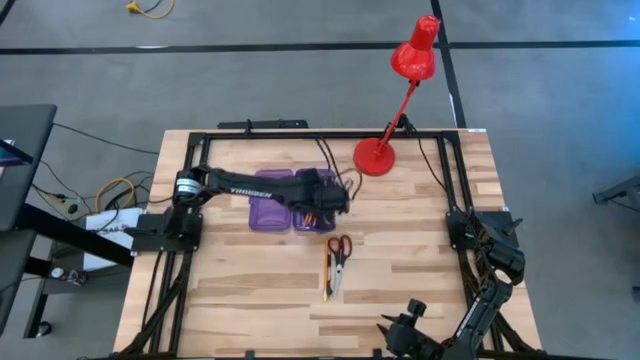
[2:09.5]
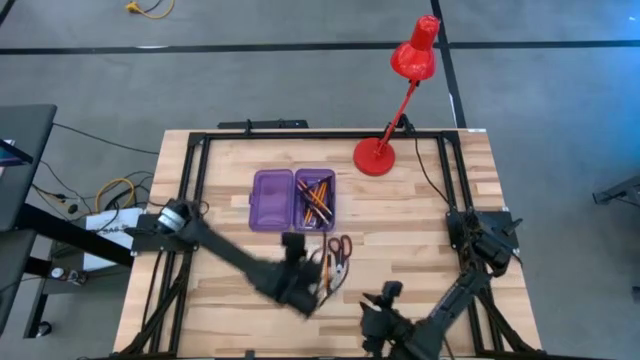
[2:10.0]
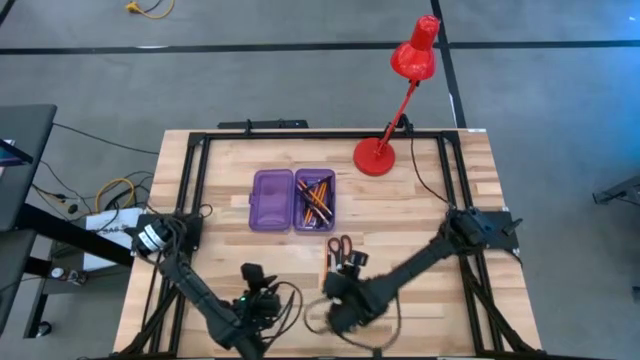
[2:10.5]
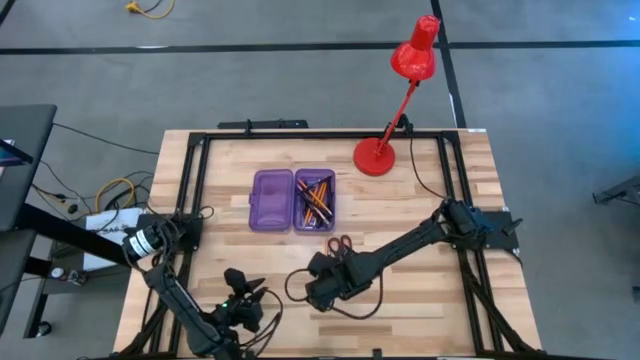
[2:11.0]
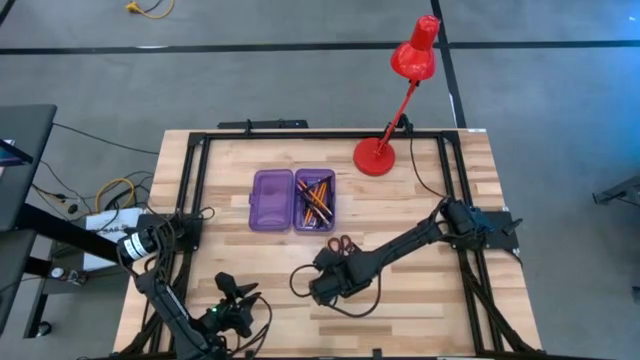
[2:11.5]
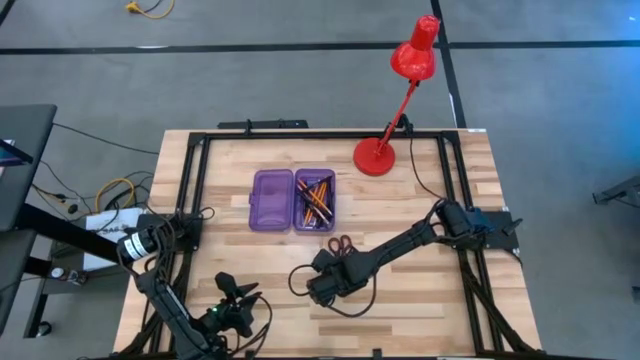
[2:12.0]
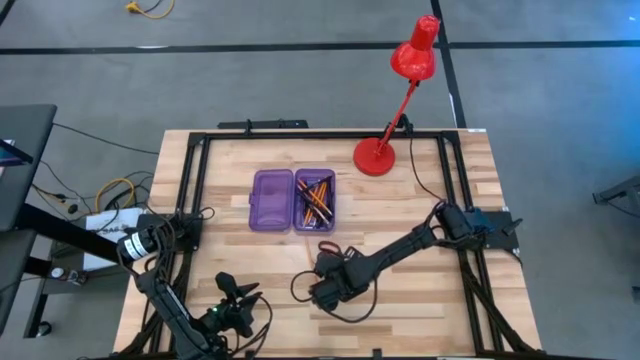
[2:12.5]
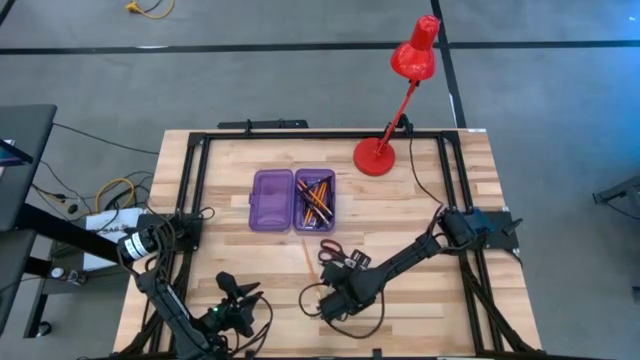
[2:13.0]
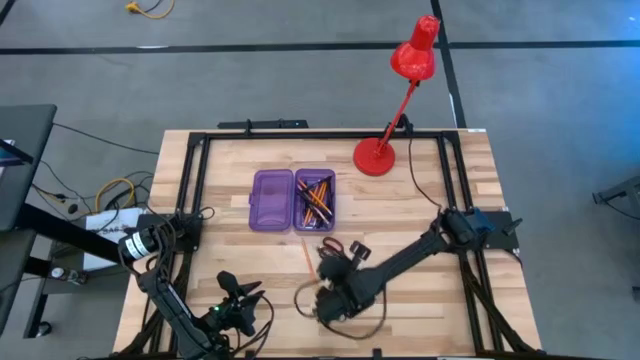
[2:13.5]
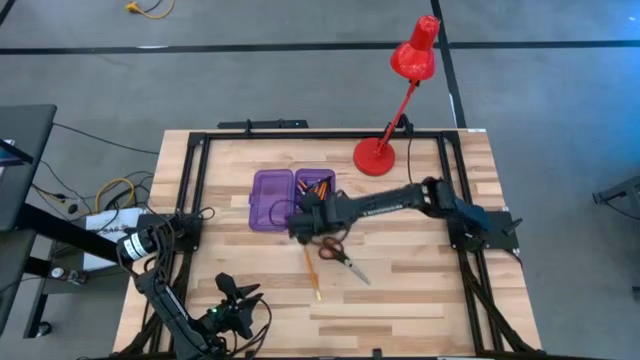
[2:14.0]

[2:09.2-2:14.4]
Task: Pick & place school supplies into a supply box
Put the black pen into the violet supply box

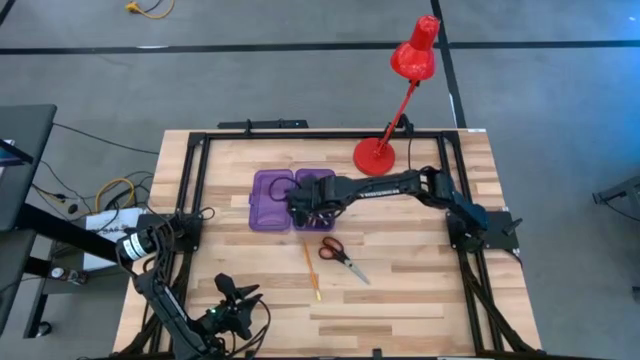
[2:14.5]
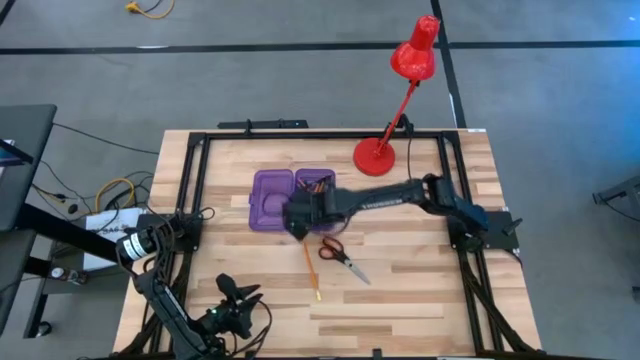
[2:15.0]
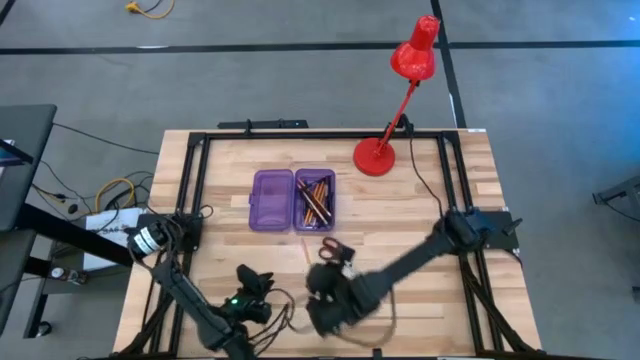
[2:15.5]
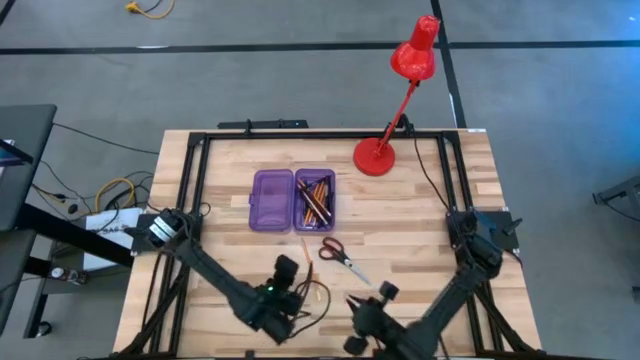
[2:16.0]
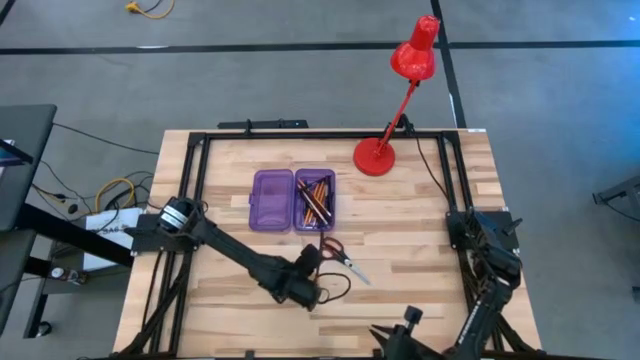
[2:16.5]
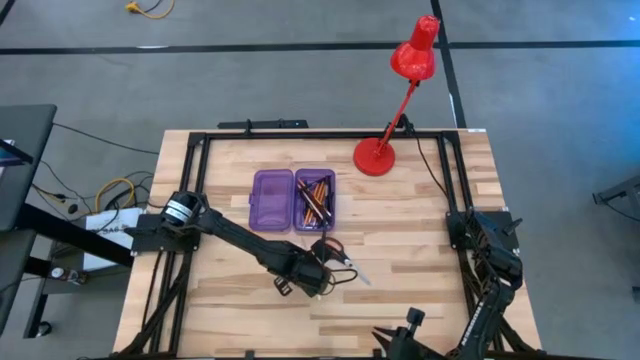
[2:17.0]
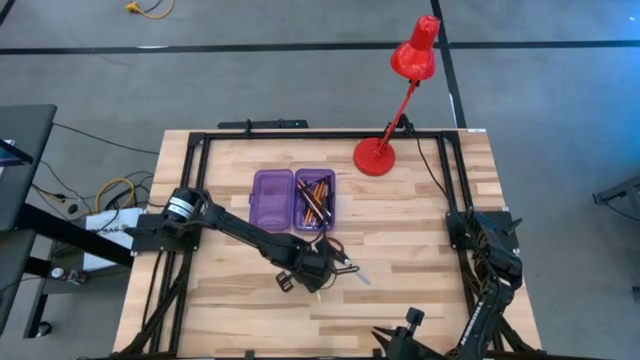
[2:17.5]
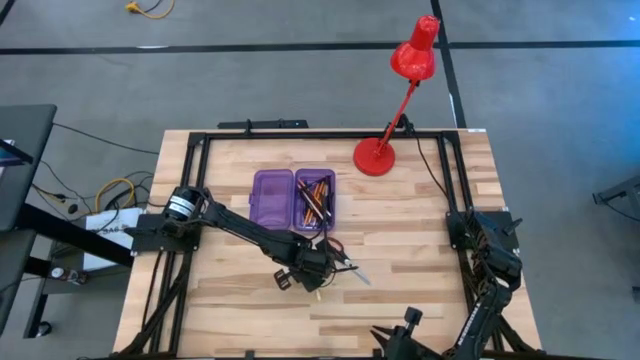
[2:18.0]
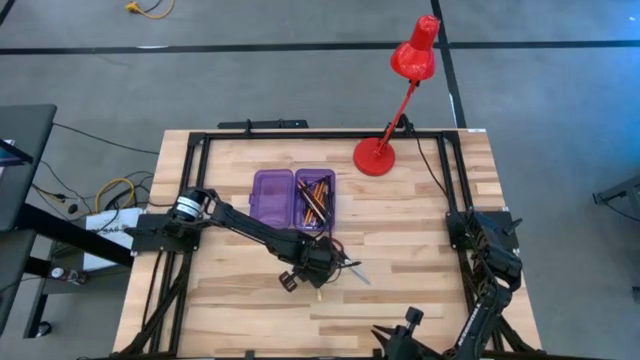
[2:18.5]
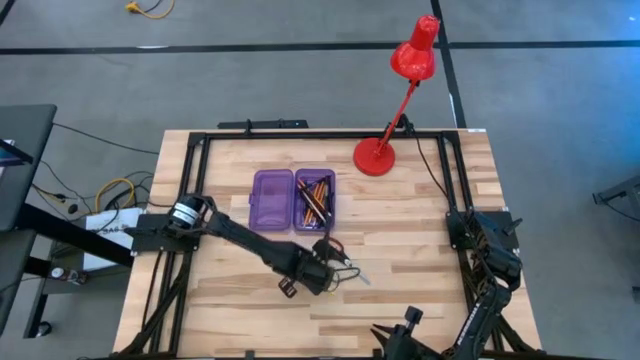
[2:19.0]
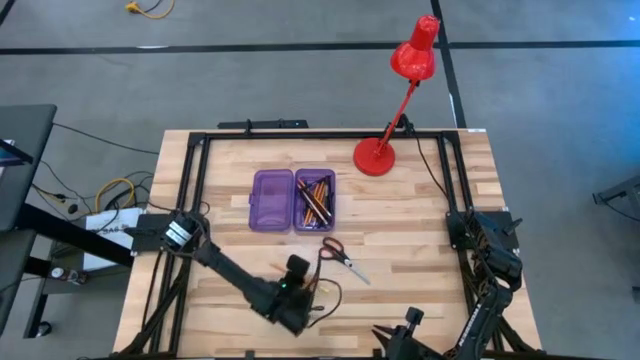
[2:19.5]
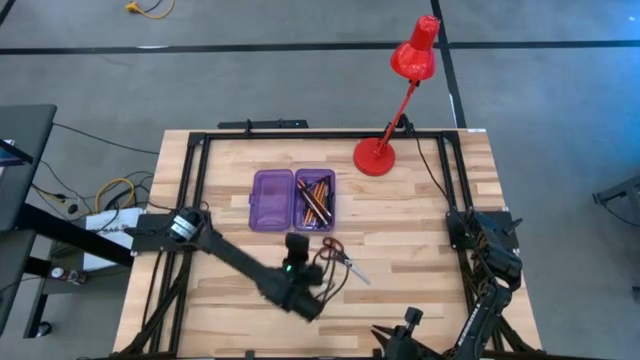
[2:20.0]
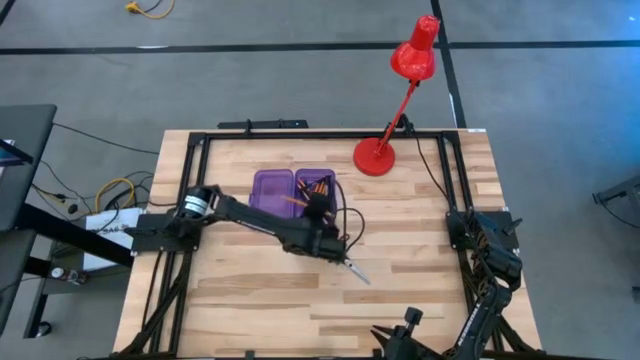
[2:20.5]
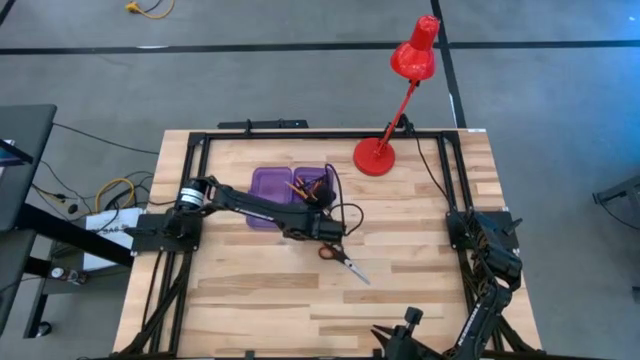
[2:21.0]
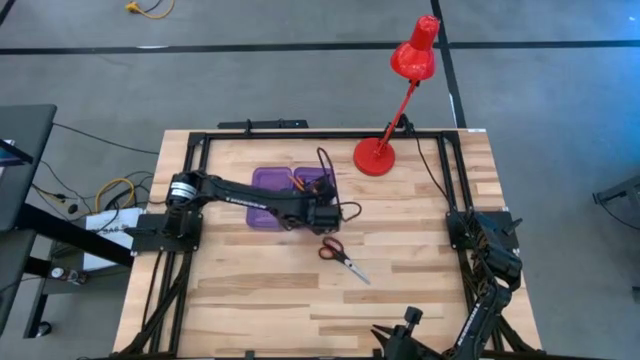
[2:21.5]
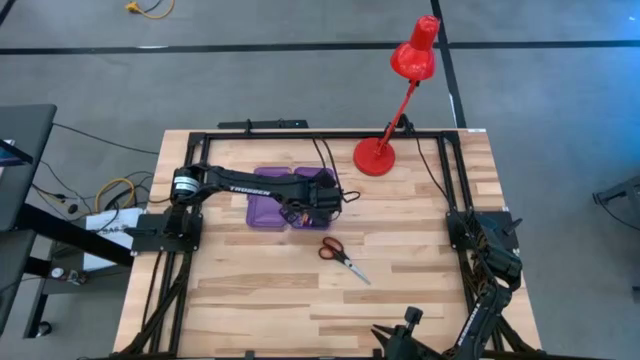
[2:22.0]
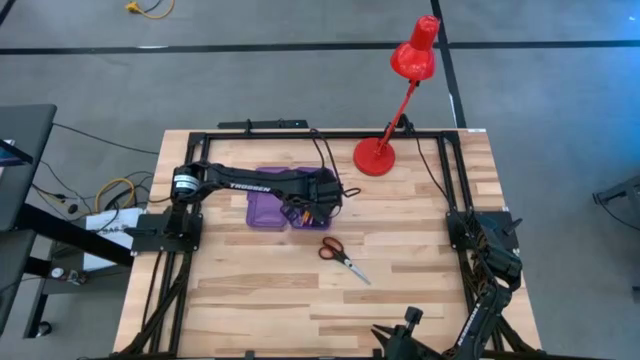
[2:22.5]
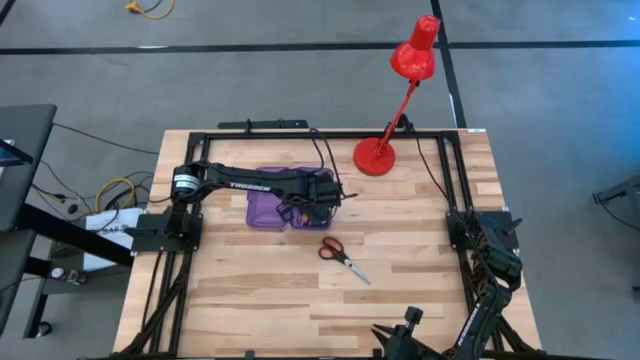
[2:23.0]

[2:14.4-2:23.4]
Put the orange pencil into the violet supply box

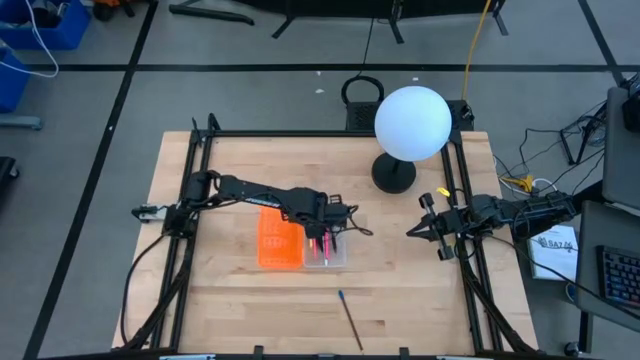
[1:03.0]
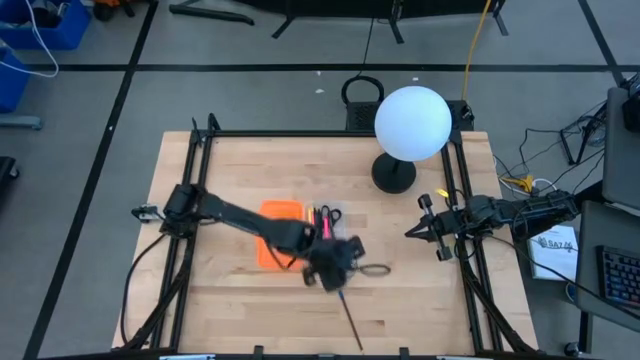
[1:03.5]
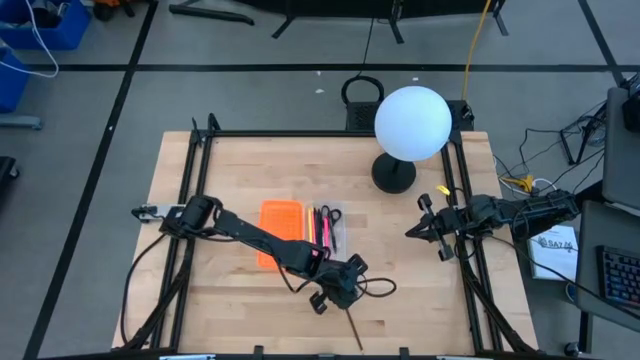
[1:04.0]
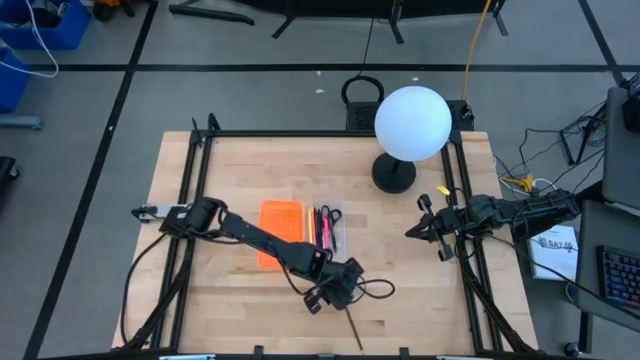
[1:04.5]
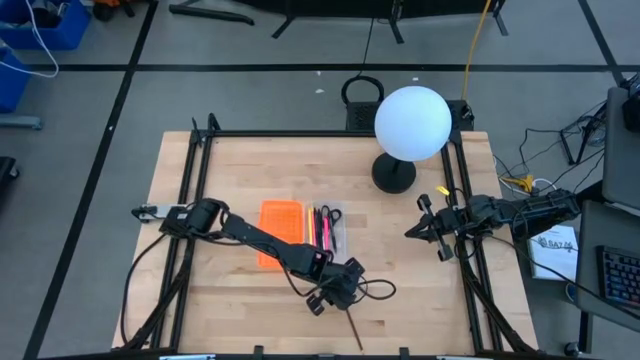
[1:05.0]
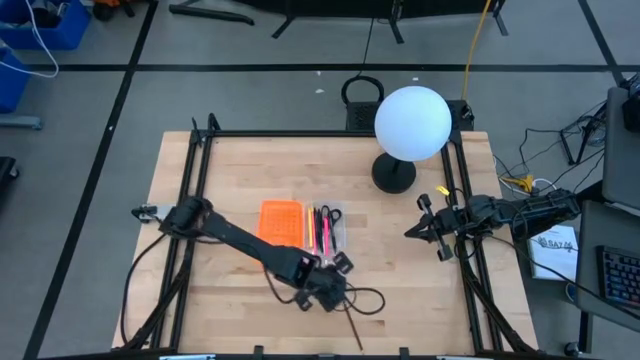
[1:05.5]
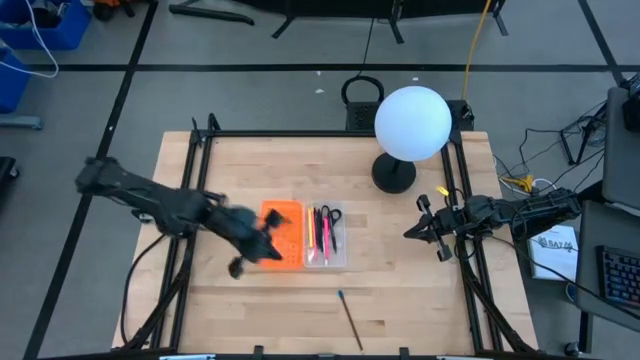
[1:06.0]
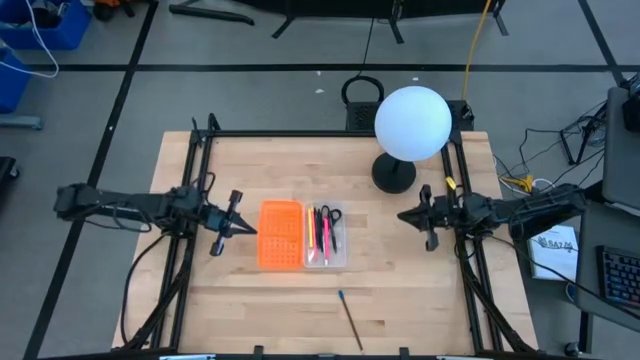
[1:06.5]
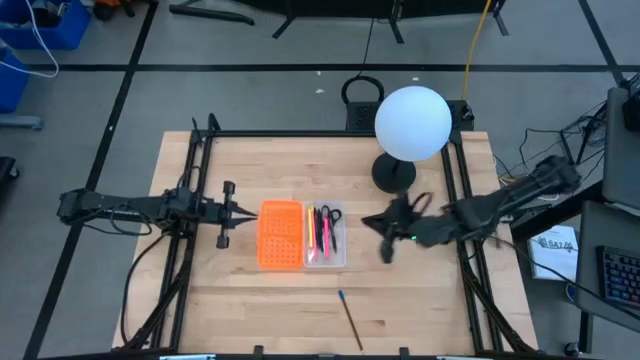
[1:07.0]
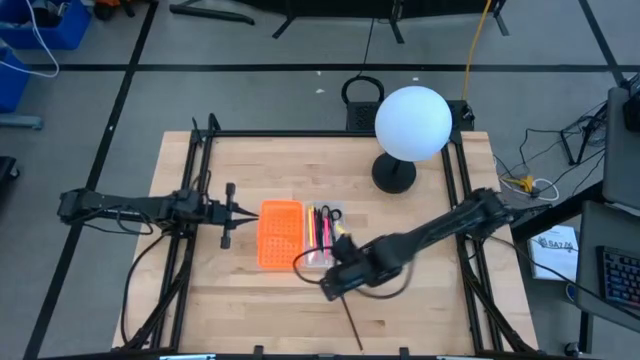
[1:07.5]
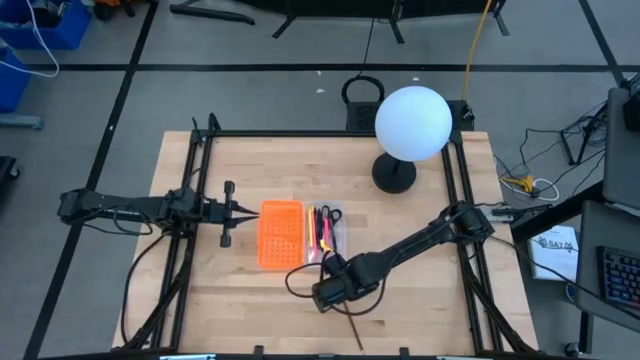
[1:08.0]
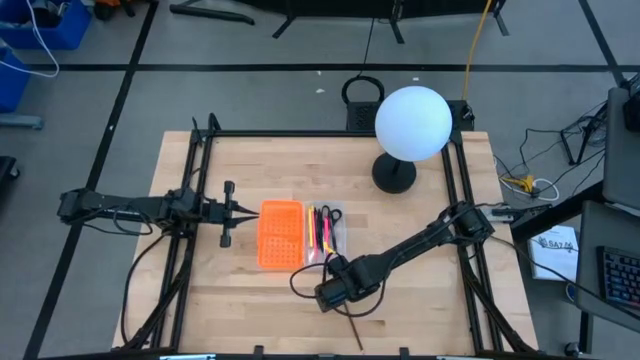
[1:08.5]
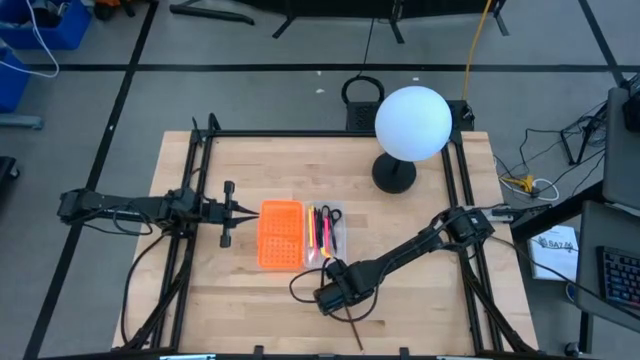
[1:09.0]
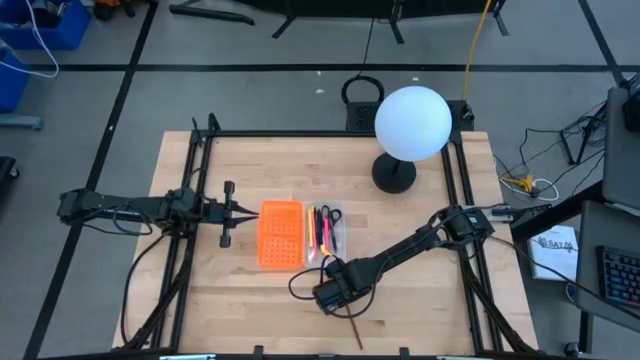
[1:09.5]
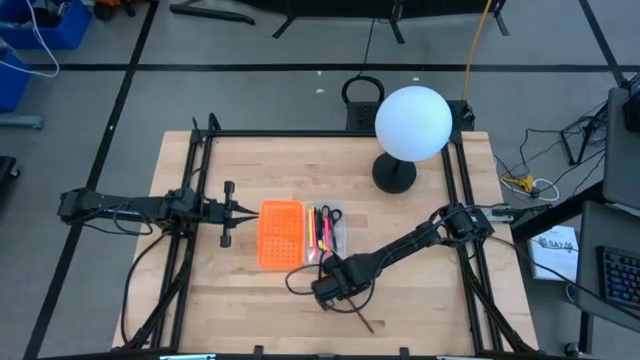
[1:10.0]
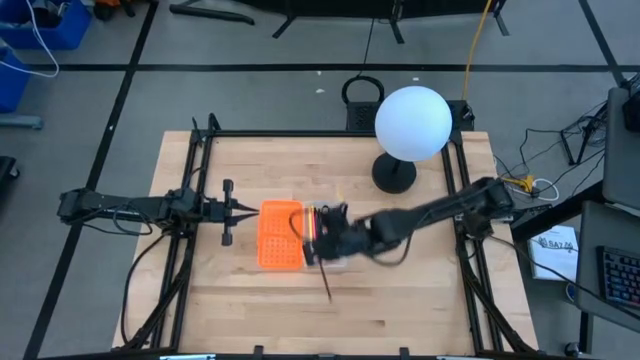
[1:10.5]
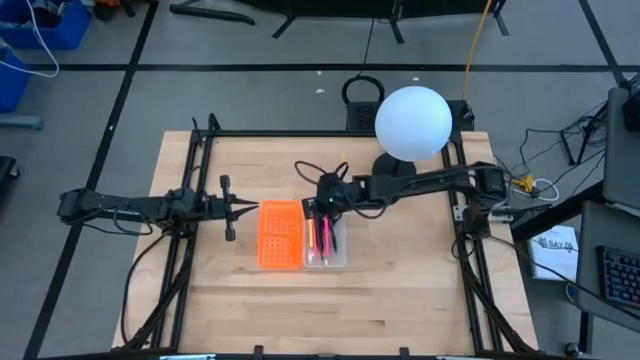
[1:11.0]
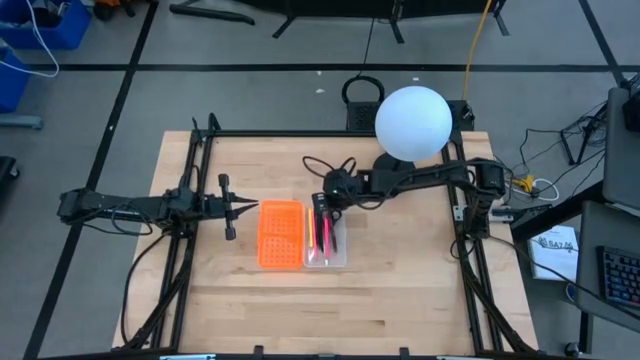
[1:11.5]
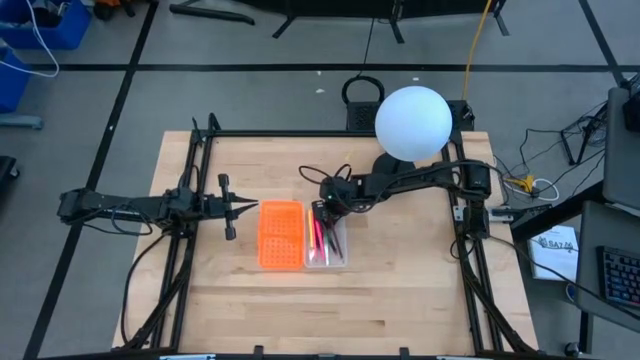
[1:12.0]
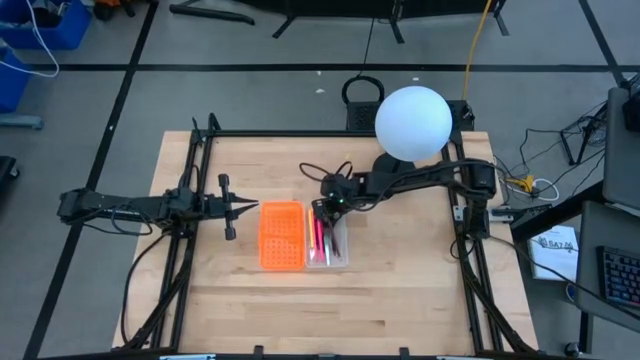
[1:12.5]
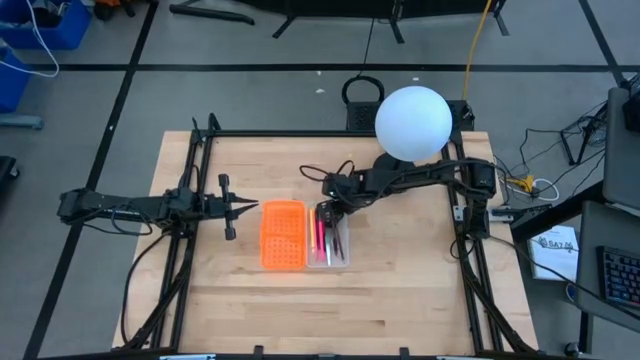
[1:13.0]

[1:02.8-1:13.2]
Task: Pick & place school supplies into a supply box
Put the brown pencil into the orange supply box
